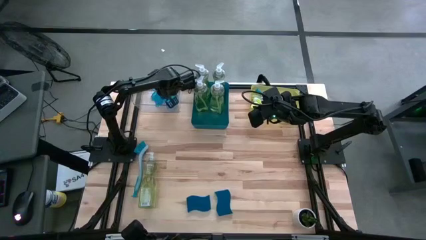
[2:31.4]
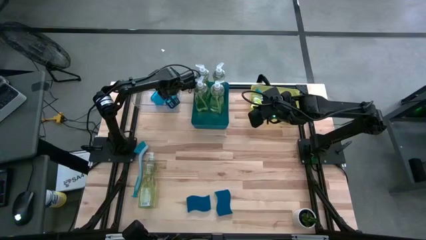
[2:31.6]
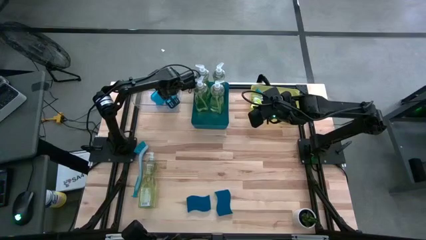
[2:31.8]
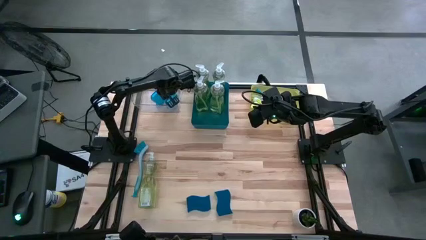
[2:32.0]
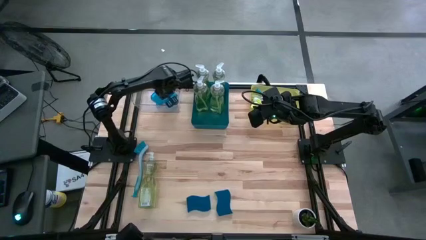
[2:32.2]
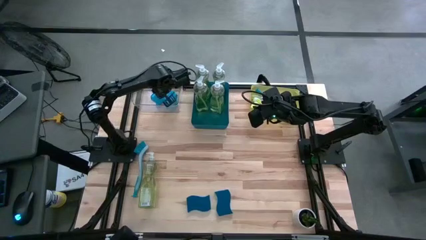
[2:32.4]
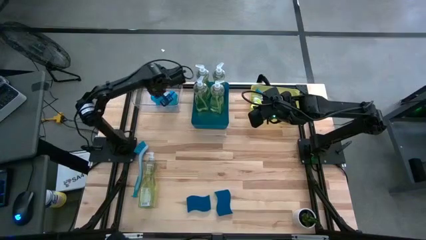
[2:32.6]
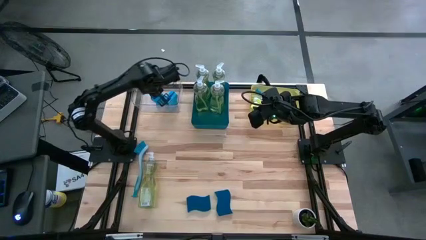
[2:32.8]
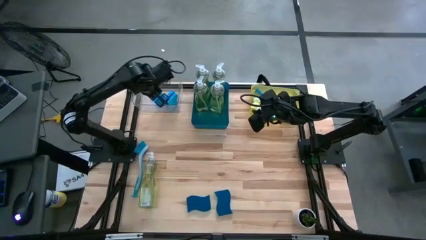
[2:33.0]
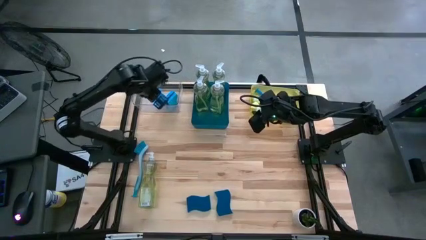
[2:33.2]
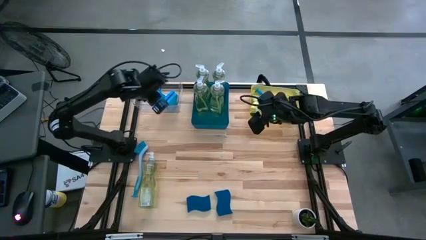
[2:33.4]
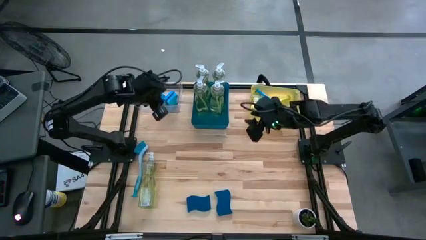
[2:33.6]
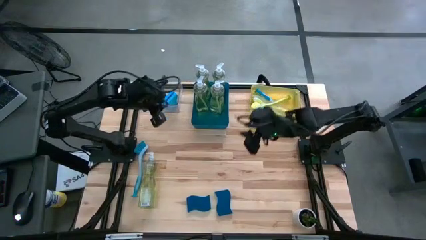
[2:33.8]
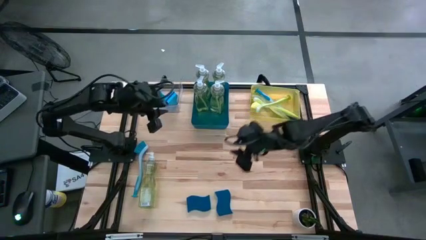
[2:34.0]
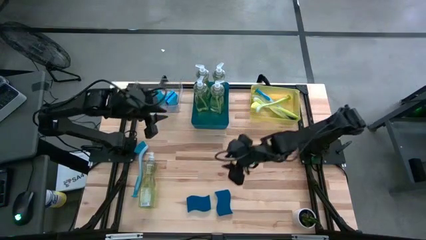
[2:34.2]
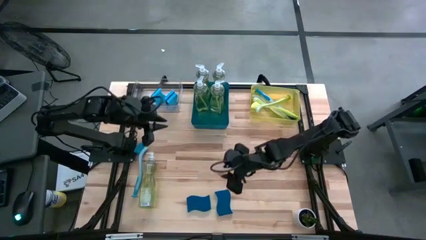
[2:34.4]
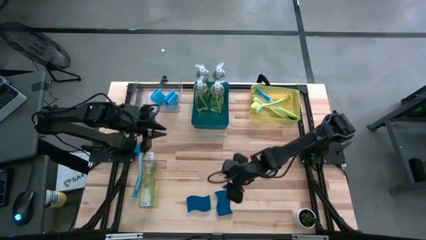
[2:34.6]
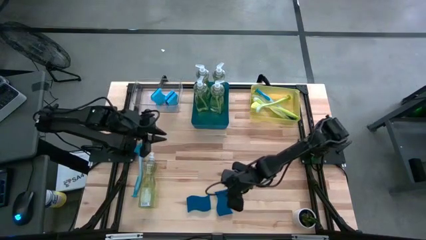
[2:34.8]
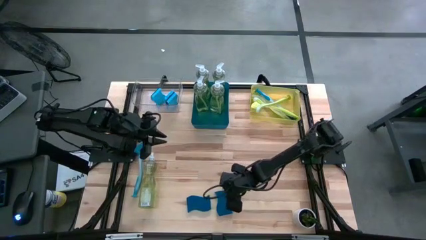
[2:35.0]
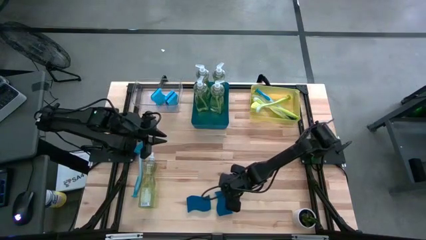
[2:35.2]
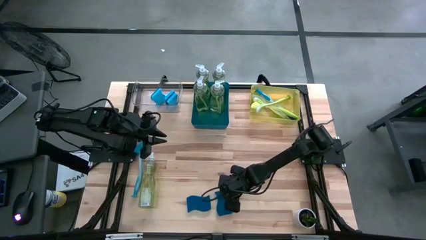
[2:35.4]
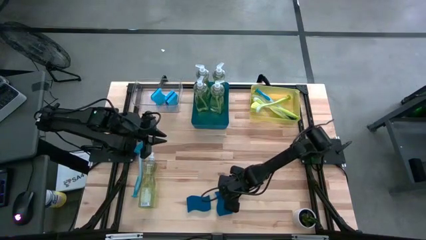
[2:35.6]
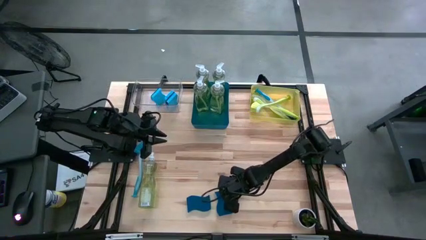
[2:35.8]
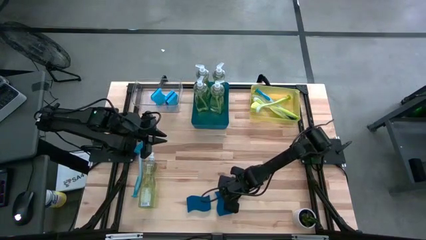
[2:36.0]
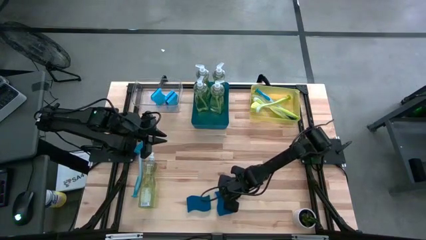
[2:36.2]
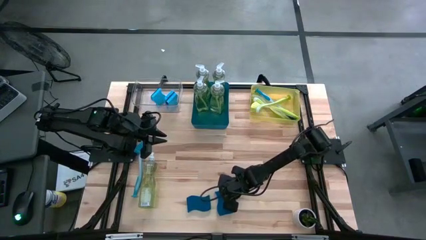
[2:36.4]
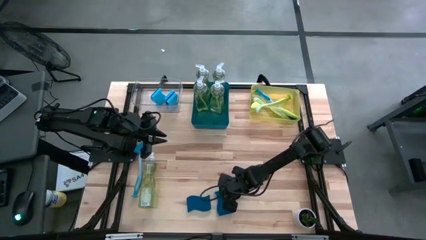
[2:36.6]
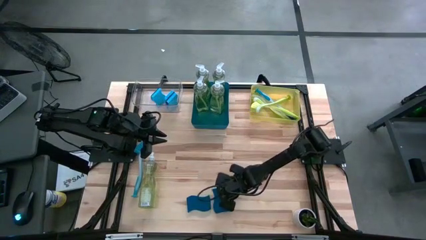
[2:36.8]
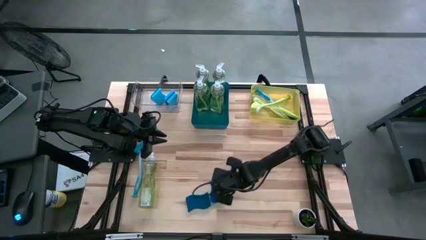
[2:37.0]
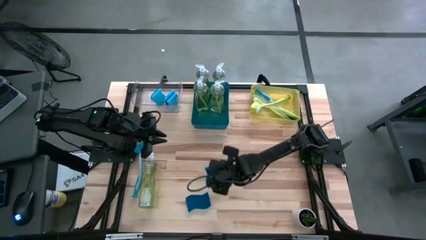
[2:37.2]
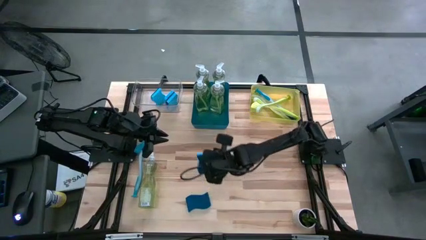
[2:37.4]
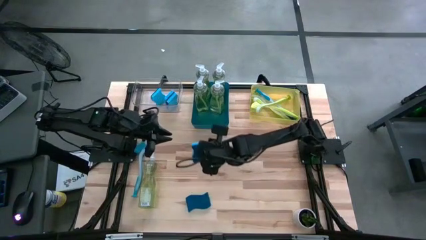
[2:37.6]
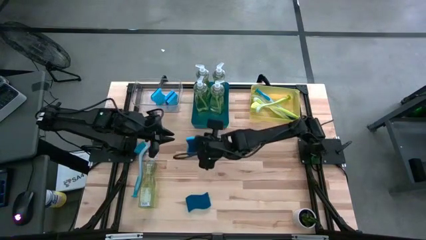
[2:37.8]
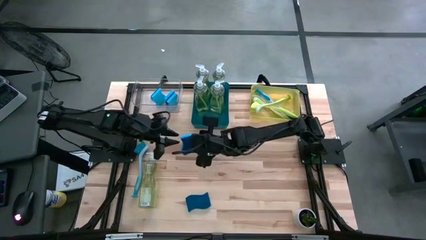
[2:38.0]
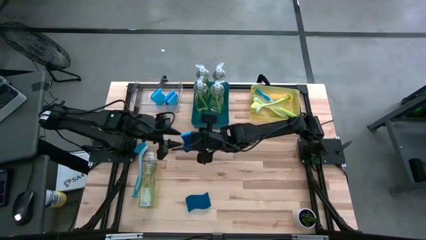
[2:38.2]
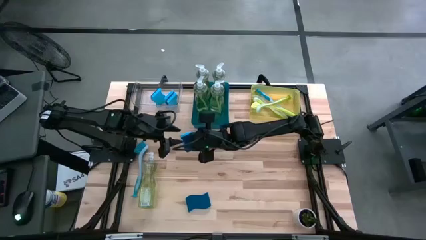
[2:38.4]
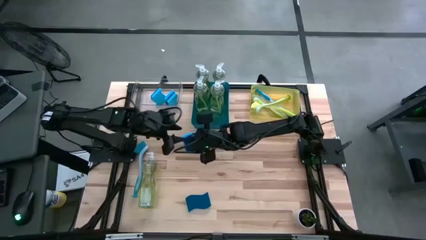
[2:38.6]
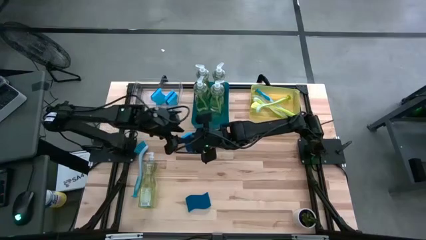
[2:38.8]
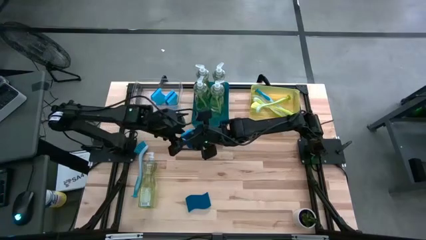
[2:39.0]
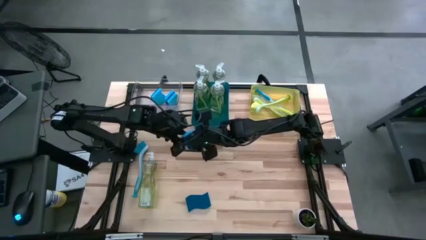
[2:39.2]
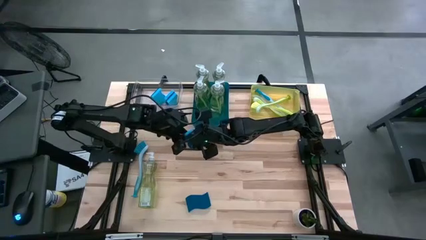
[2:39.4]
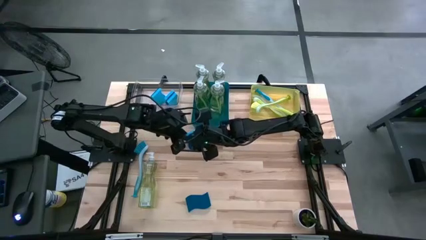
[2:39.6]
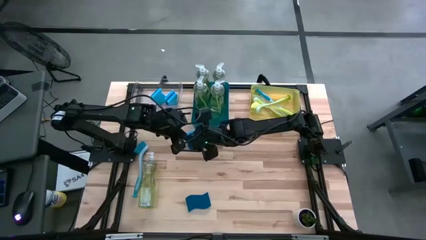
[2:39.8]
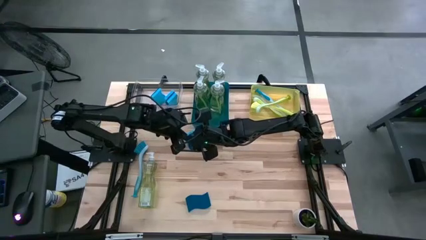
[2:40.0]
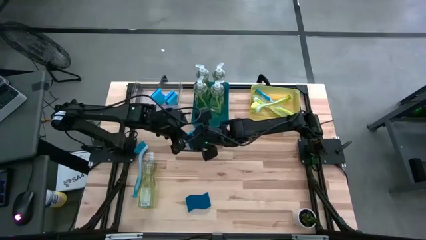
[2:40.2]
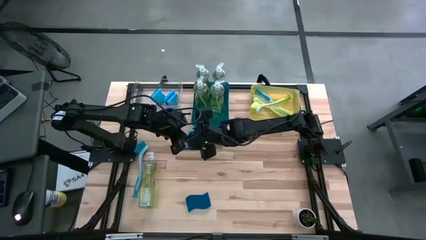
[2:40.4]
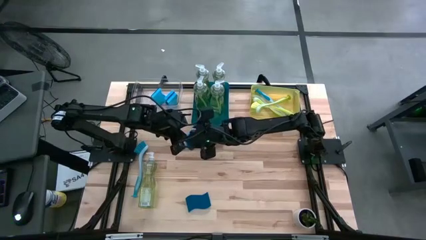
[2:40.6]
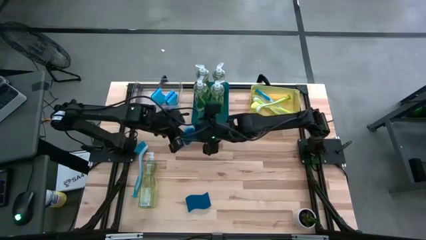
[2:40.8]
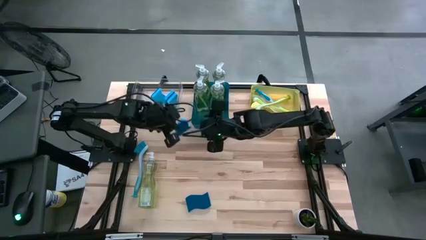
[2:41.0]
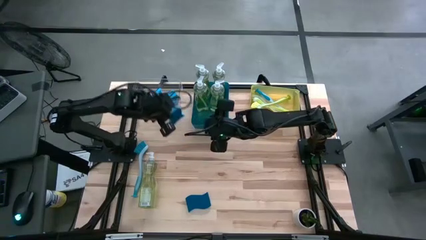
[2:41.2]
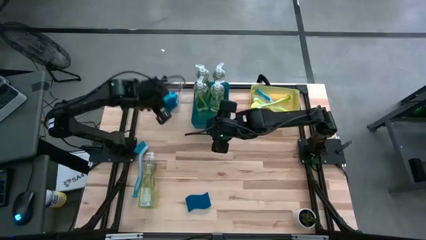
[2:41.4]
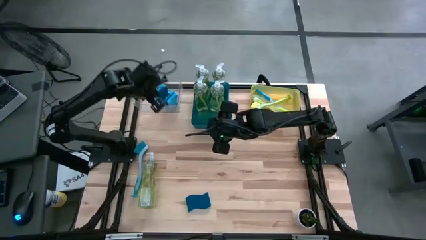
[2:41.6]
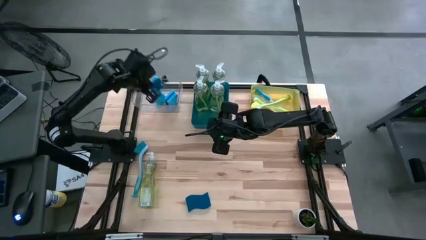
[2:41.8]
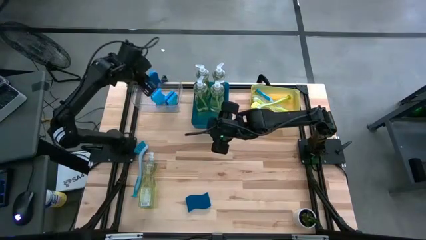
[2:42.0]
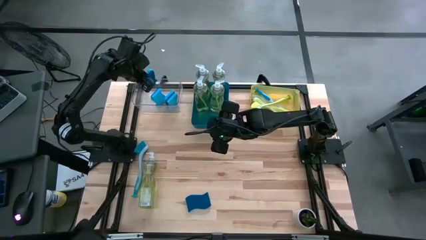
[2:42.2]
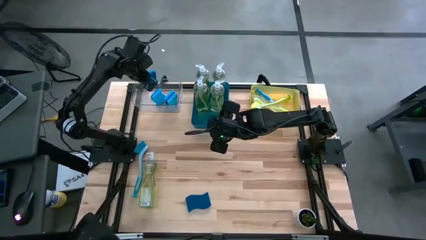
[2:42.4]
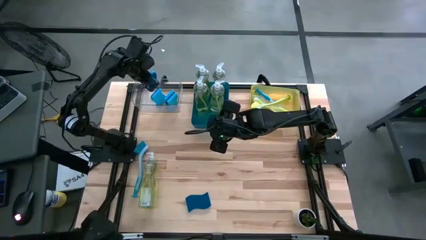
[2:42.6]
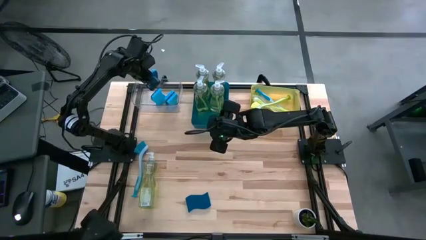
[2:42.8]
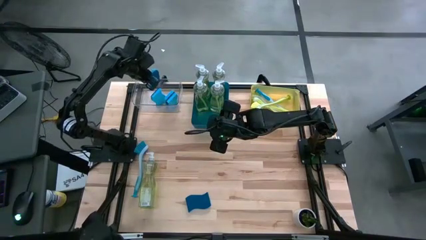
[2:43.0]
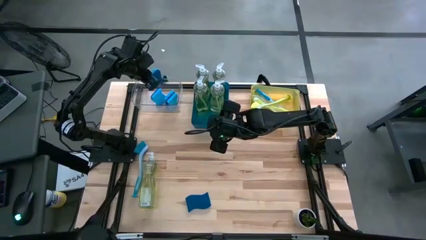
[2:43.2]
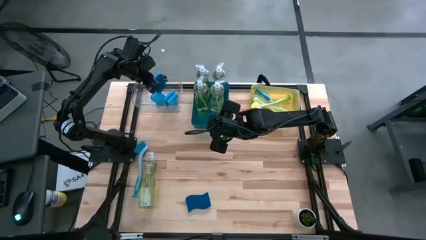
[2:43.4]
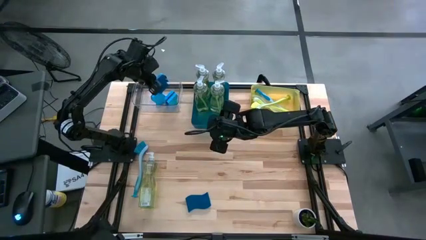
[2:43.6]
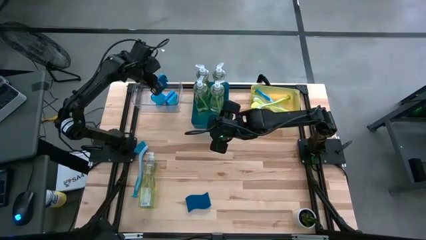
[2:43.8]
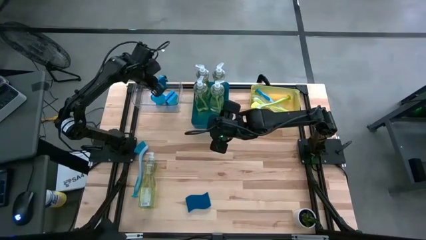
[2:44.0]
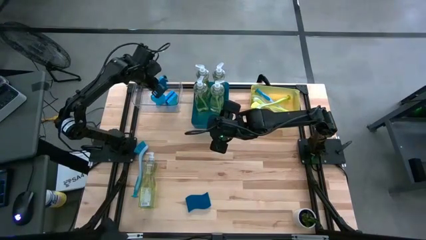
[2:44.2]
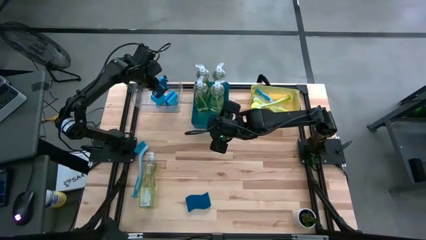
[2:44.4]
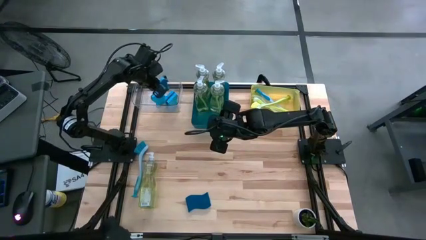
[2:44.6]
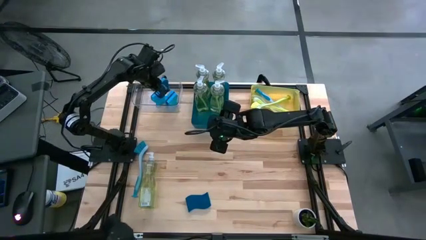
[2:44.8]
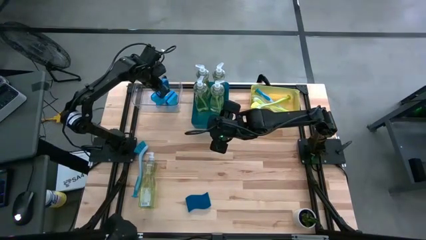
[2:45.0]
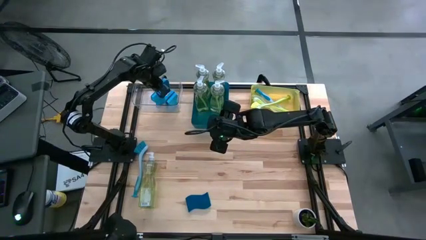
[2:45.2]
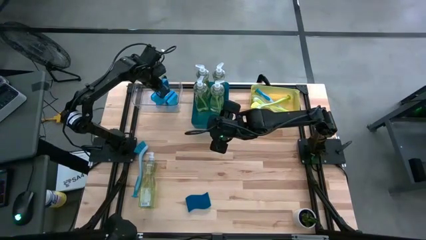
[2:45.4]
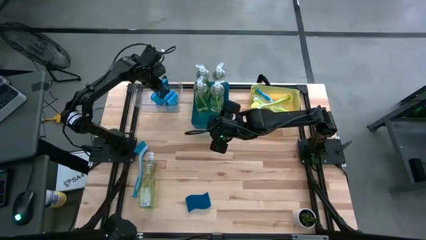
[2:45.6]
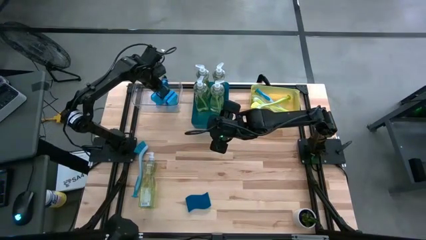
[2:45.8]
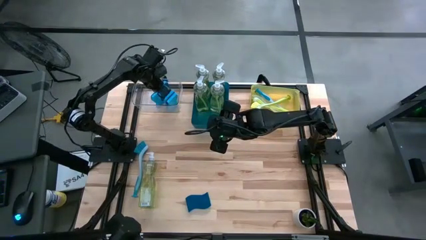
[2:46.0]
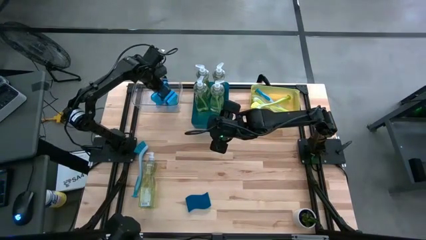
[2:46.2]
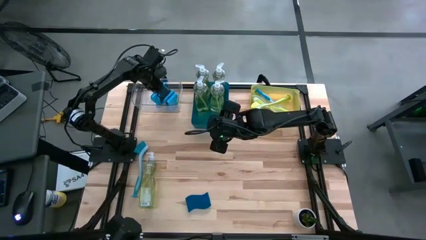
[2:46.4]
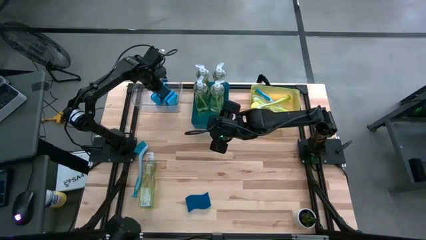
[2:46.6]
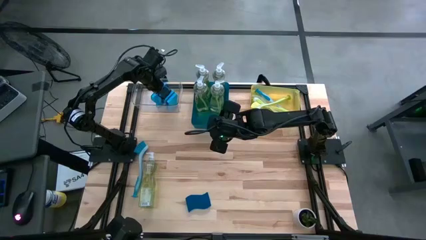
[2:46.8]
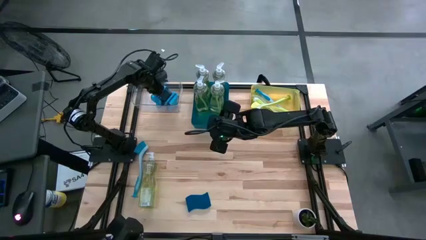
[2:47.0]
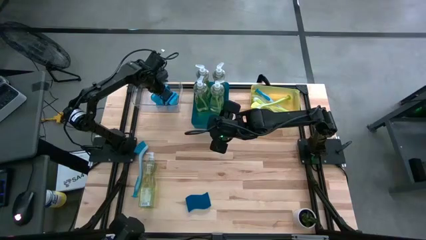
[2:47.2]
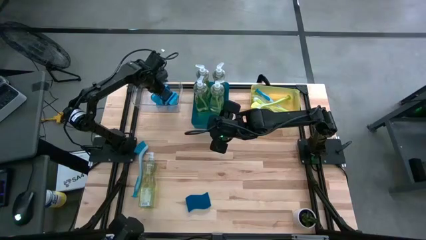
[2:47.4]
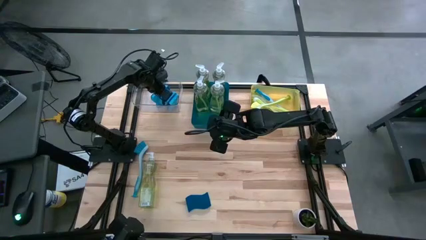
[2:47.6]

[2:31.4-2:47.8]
Task: Pick & Place Kitchen Sink Supplies
Put the blue sponge into the transparent bin
